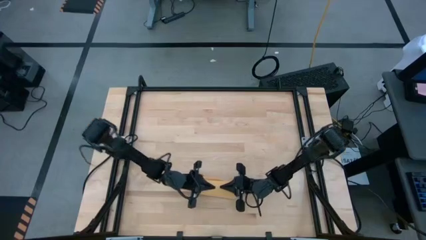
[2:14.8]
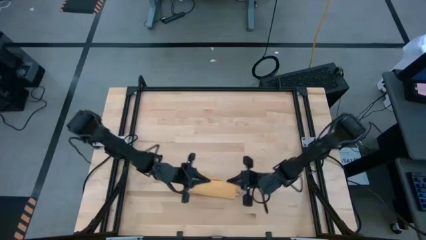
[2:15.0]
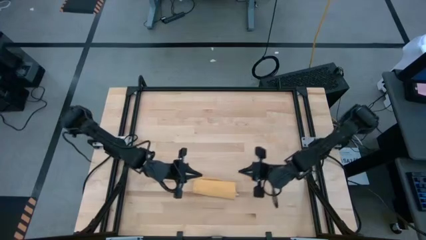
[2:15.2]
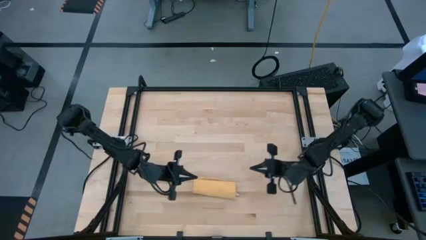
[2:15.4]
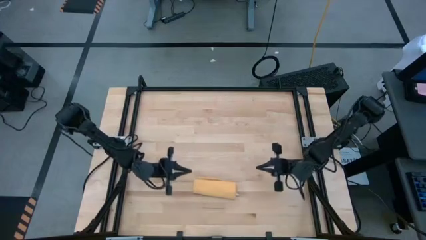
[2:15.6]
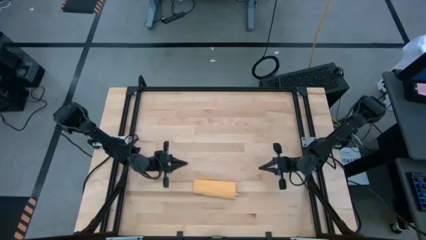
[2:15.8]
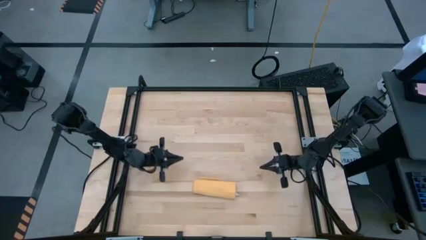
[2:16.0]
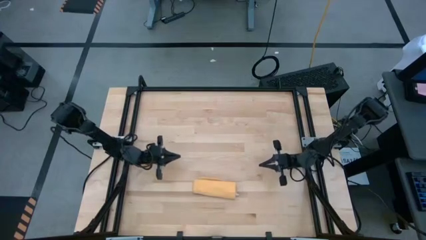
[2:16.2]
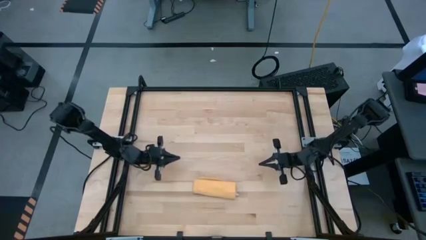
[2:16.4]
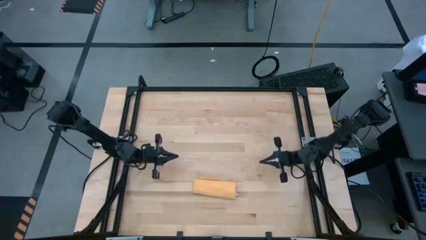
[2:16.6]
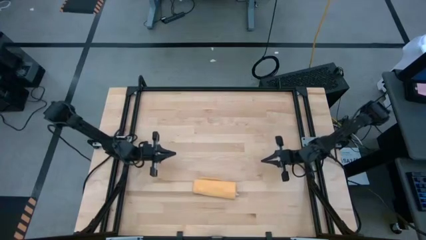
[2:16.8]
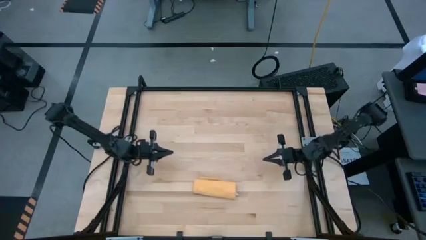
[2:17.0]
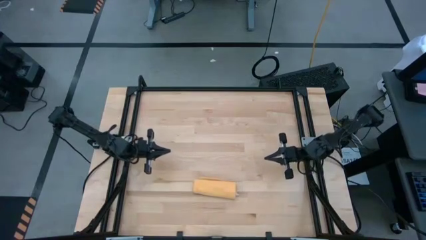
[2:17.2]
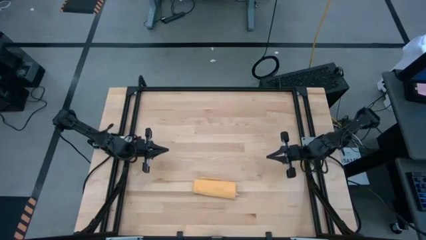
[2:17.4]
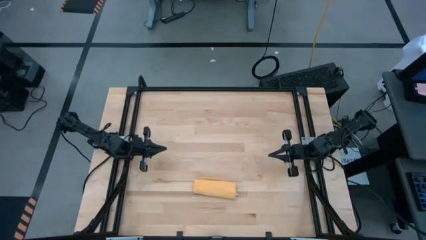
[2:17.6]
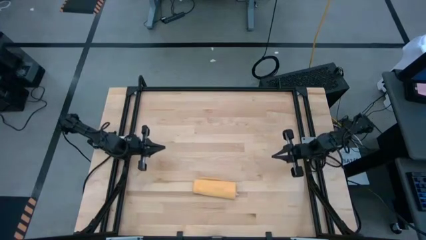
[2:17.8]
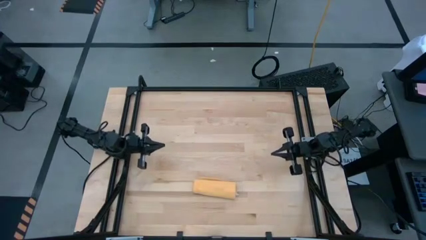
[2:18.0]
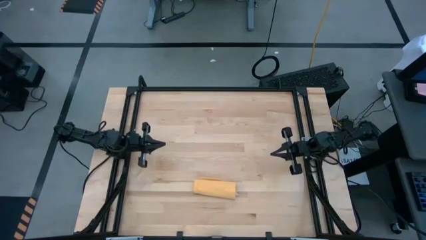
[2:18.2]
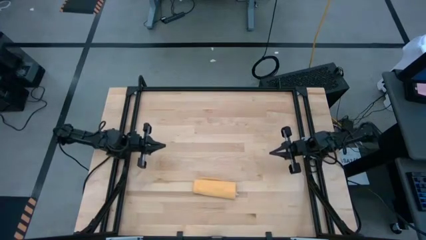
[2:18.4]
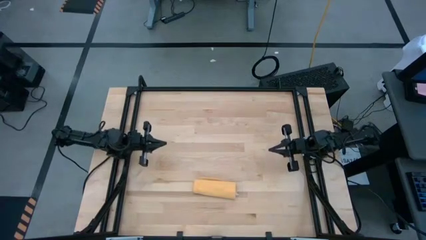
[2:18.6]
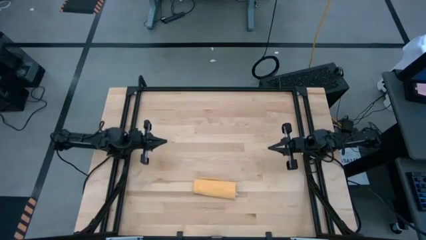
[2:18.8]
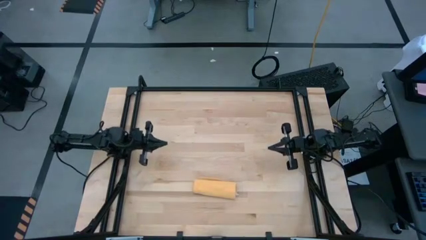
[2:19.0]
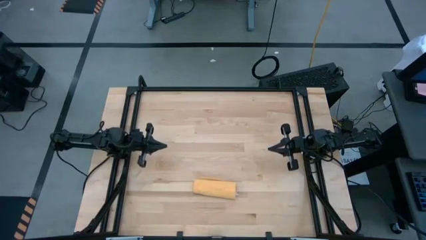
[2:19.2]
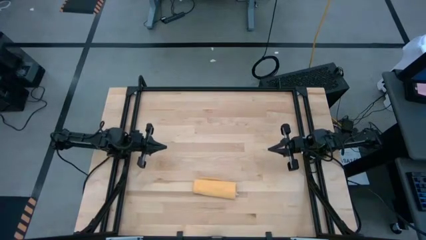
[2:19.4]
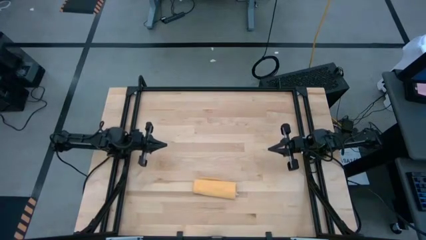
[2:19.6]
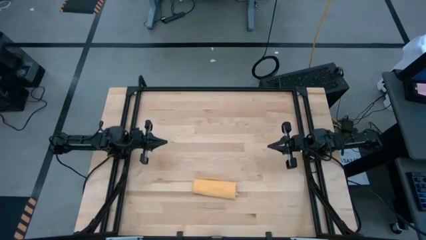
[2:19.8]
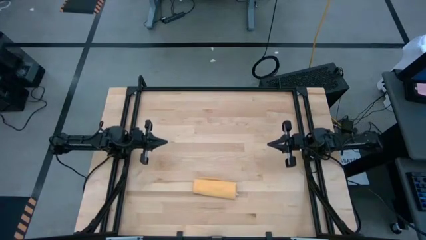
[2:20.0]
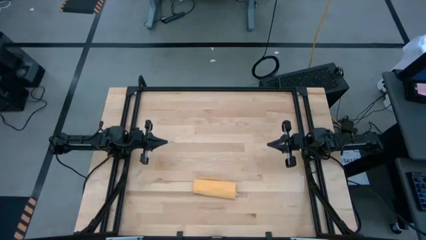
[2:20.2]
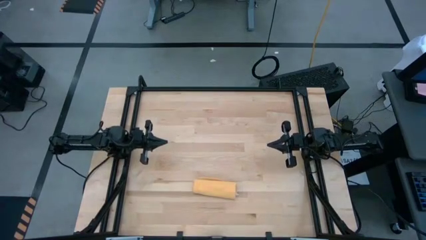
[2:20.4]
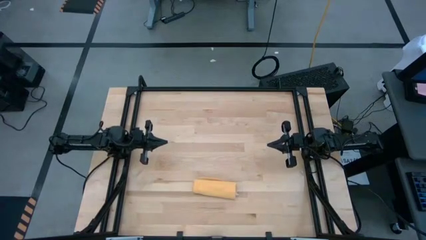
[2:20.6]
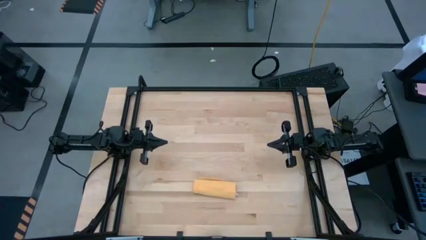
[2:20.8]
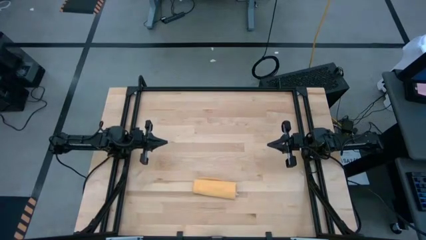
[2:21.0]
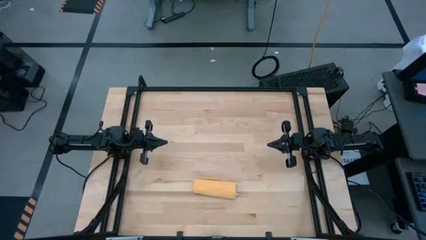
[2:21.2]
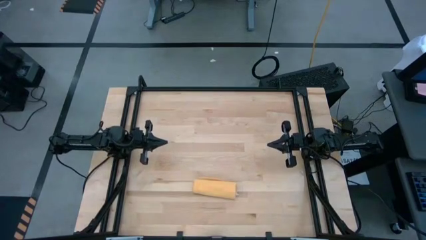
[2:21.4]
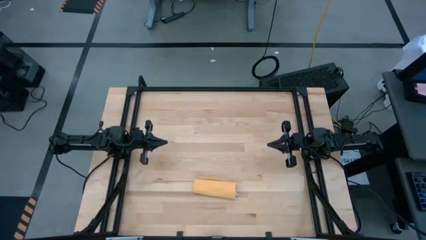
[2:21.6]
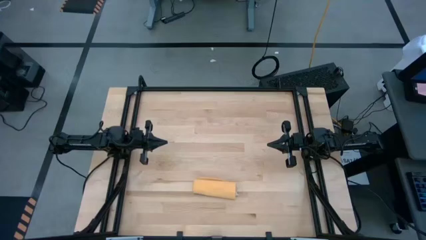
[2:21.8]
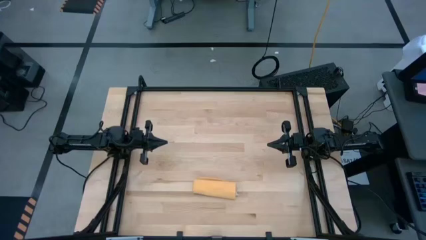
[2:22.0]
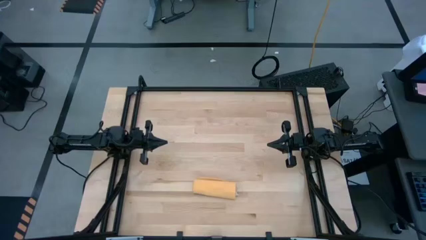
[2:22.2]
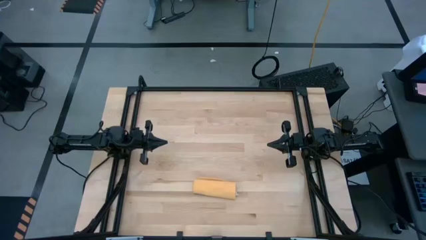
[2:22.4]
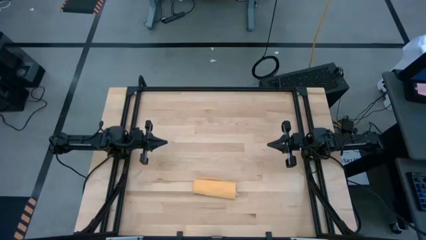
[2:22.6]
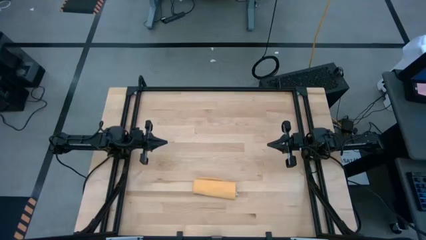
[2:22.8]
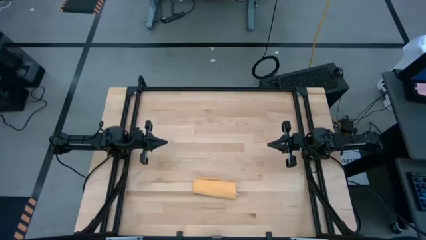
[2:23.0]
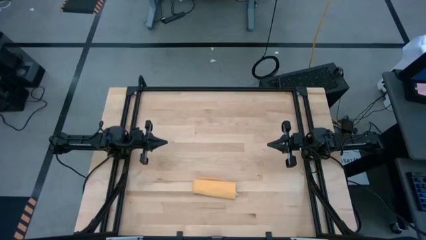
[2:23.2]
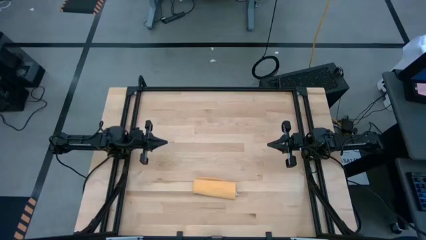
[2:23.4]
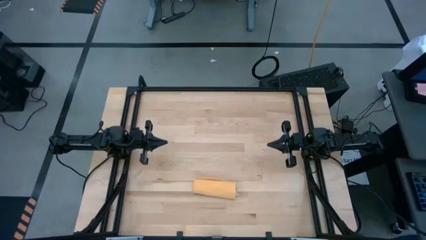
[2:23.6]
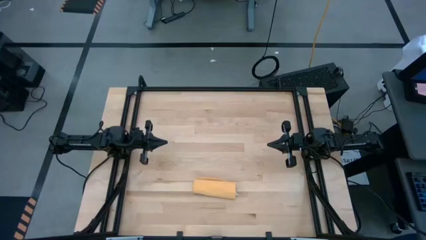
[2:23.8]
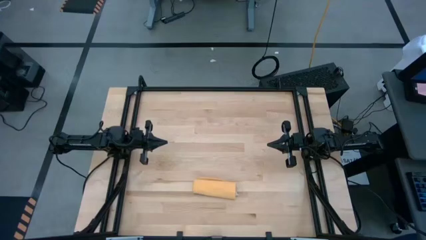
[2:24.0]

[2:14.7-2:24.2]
Task: Roll towel
Return to Home Position

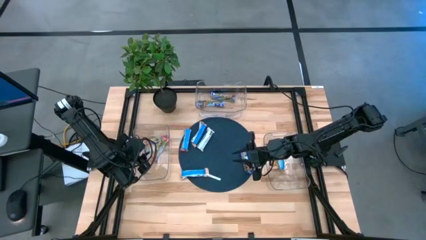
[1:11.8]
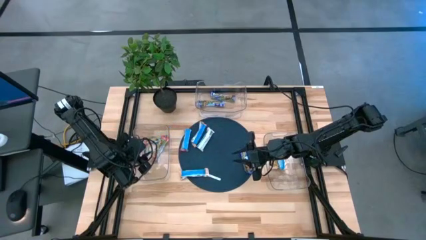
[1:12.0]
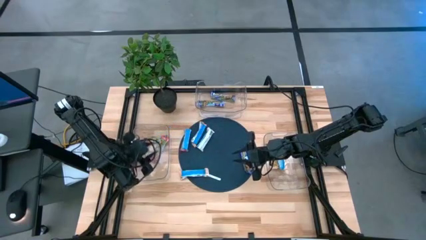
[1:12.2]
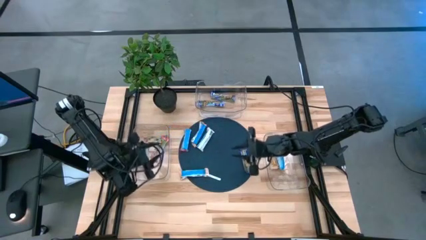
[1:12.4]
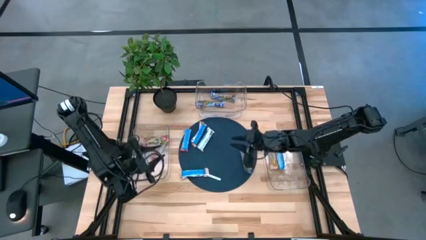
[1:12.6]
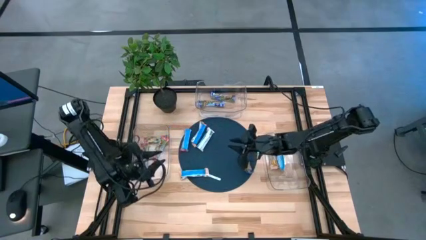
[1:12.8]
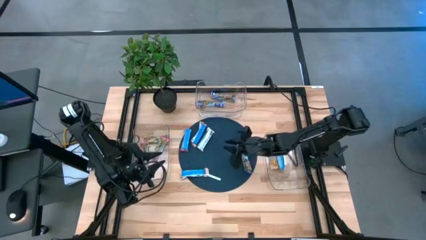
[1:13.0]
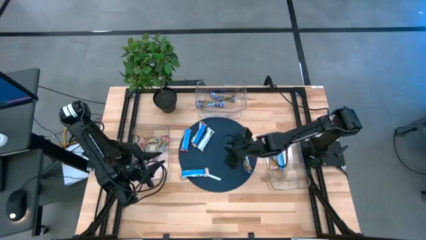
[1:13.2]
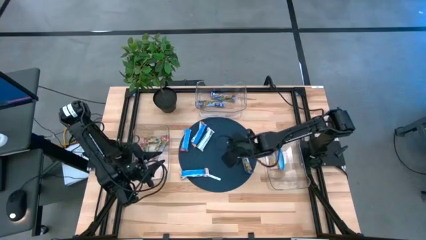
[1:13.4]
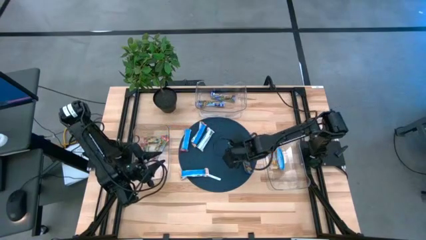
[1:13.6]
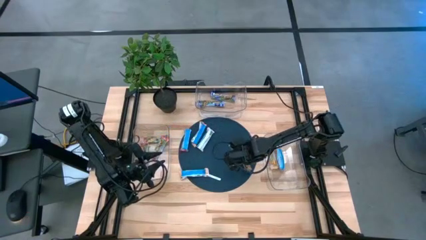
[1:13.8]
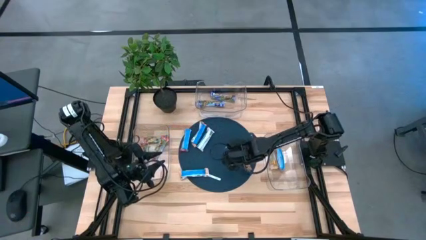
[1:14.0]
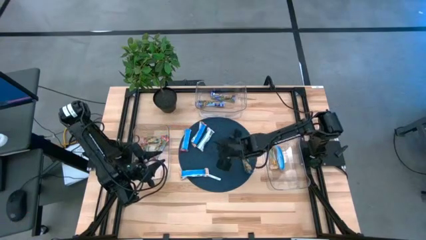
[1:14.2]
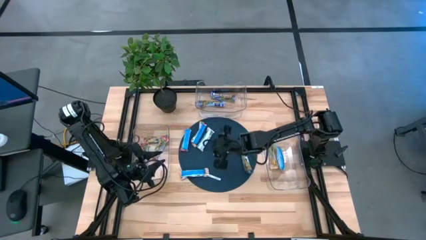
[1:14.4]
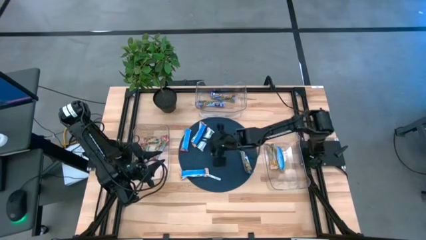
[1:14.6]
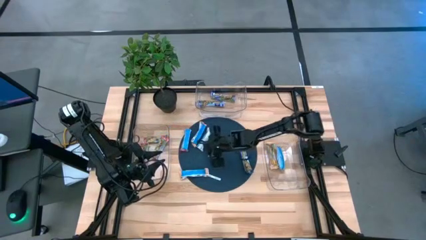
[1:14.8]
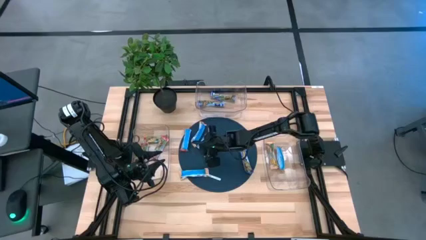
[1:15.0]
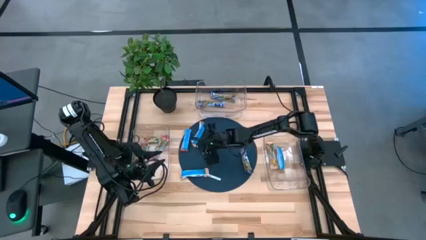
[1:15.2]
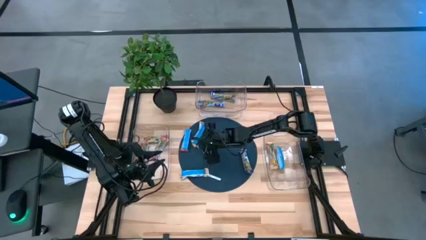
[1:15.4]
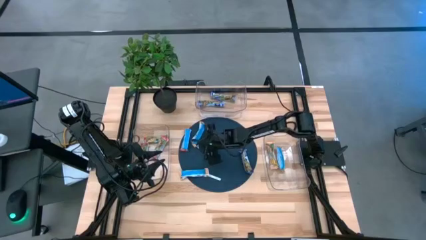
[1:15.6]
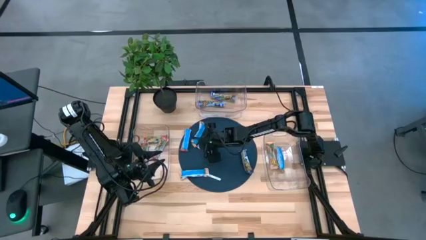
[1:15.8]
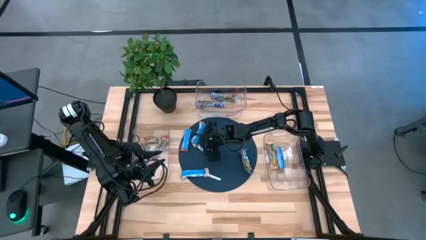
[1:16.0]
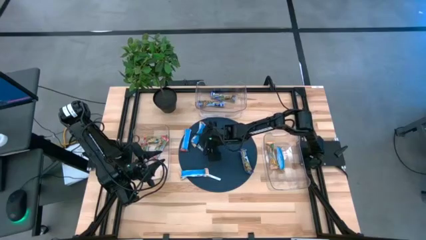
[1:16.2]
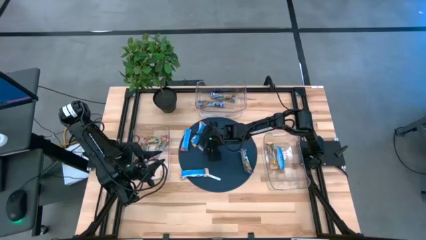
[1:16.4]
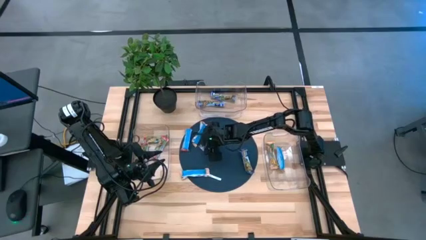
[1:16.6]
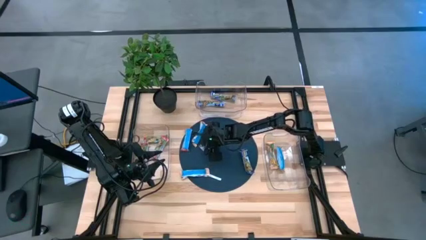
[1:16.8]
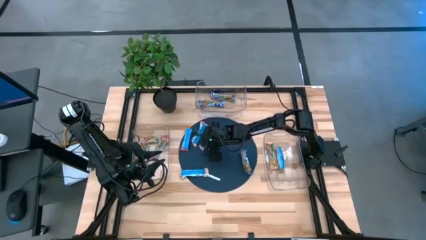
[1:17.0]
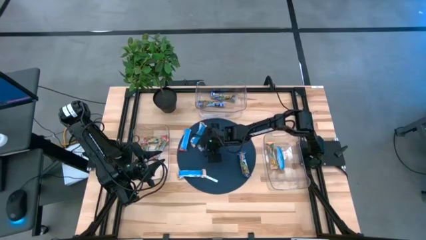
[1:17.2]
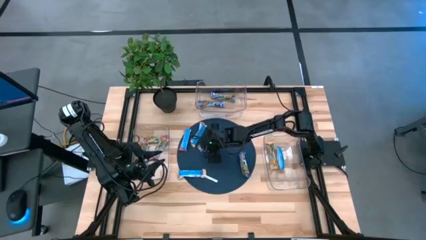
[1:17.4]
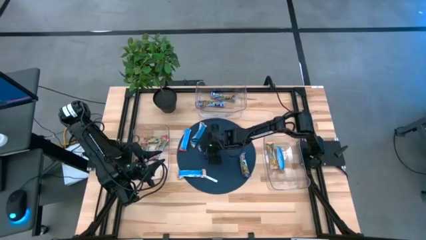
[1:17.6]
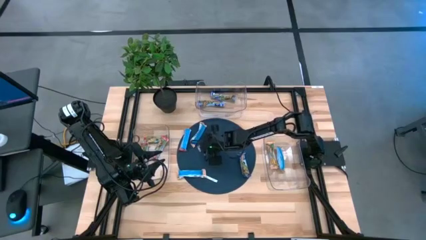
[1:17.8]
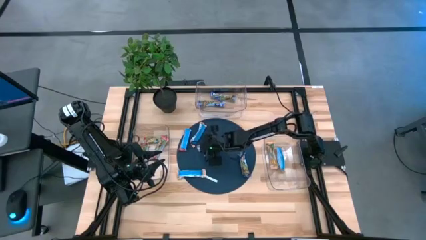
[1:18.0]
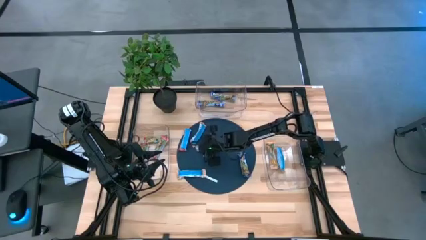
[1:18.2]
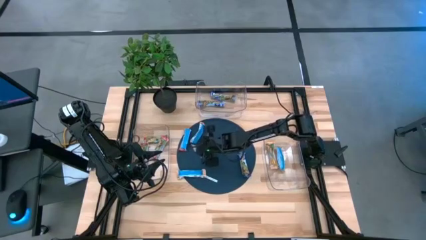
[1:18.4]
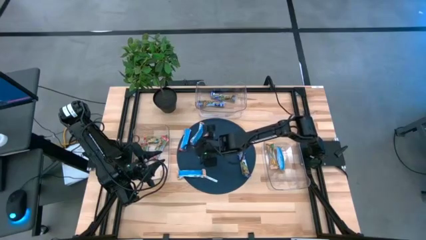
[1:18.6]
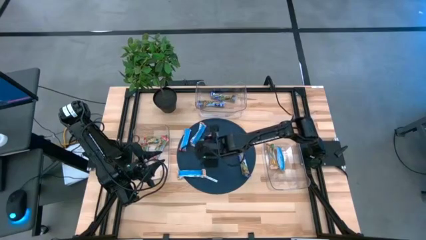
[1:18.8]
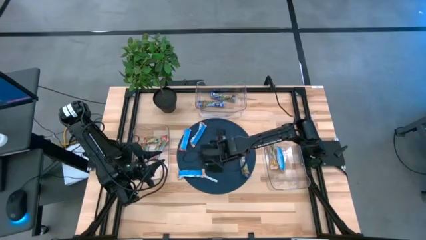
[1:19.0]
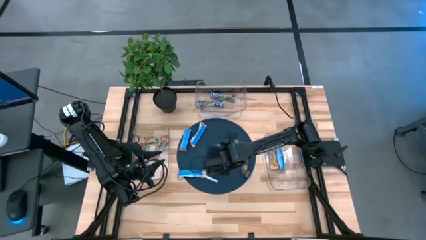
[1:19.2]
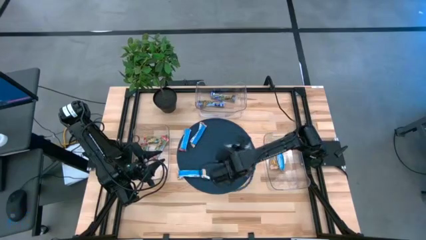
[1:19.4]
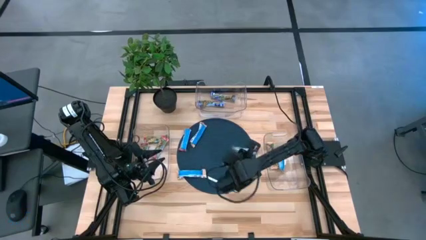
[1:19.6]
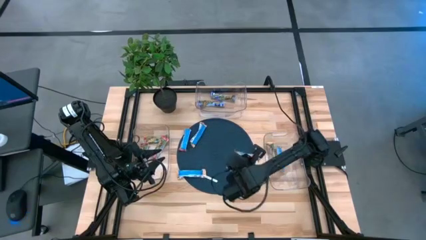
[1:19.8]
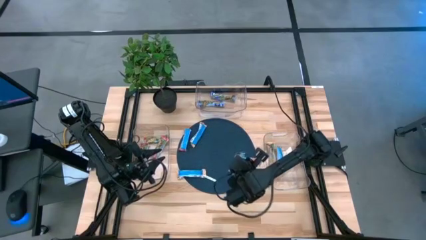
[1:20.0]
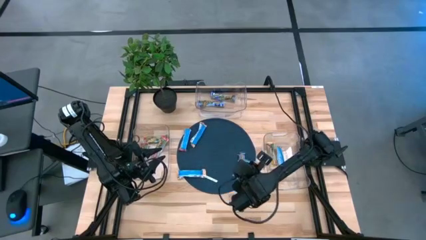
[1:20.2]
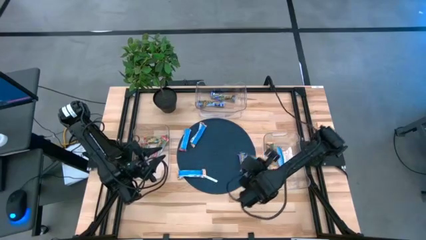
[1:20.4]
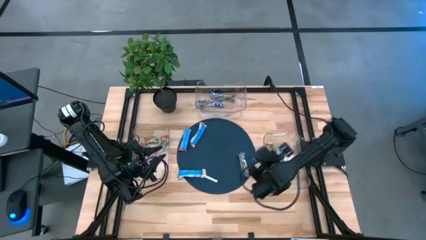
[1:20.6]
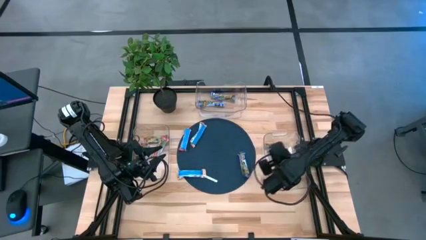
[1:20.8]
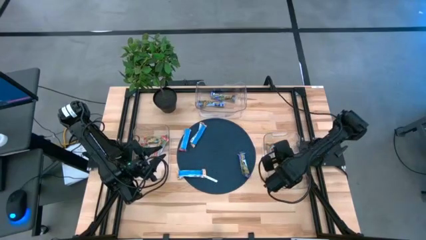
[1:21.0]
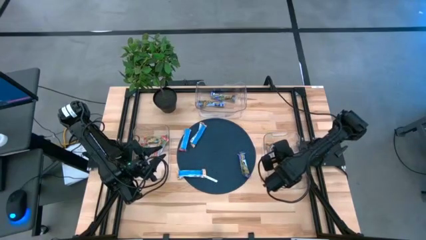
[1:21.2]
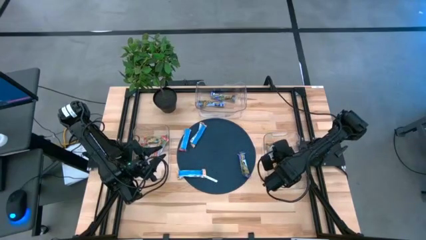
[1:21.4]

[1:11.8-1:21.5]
Task: Pick and place Granola Bars by type
Put the top right orange granola bar into the right transparent bin
